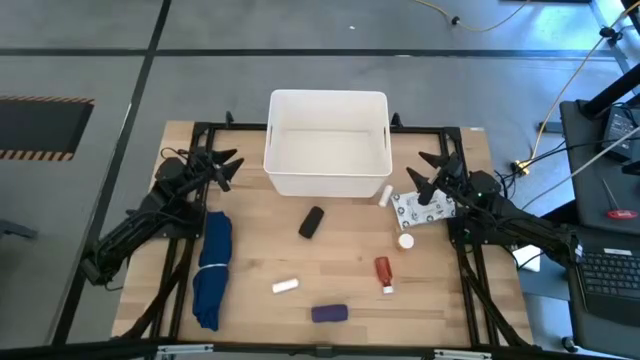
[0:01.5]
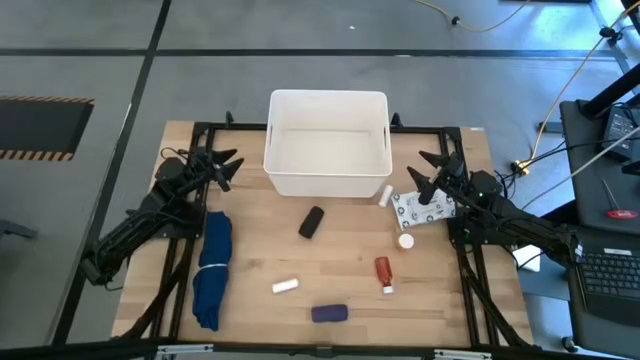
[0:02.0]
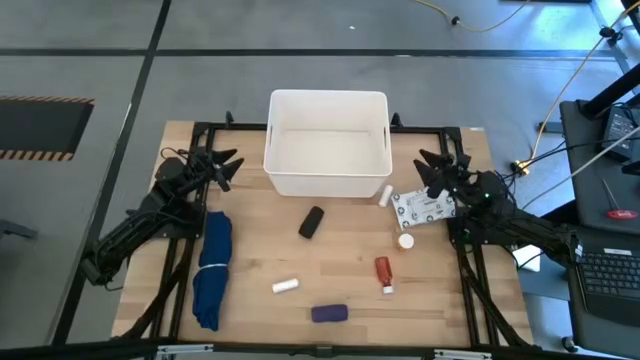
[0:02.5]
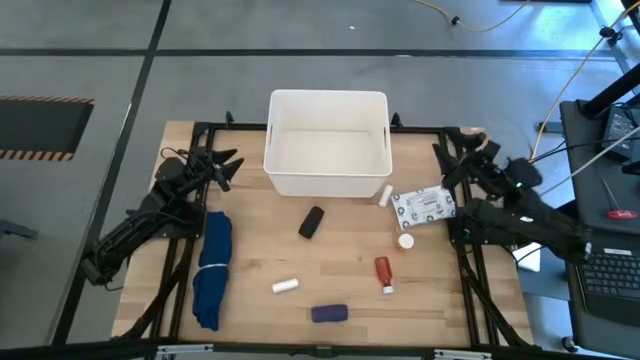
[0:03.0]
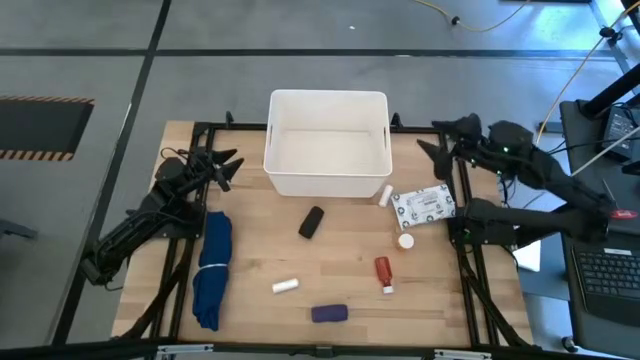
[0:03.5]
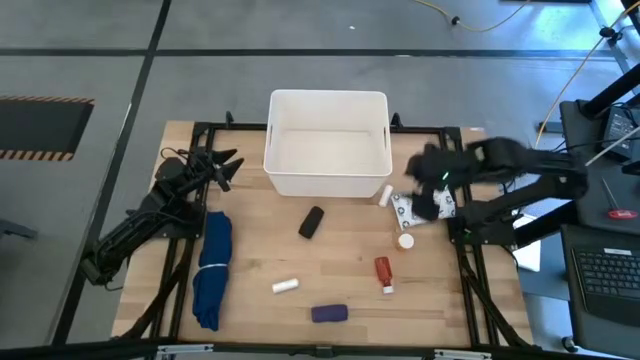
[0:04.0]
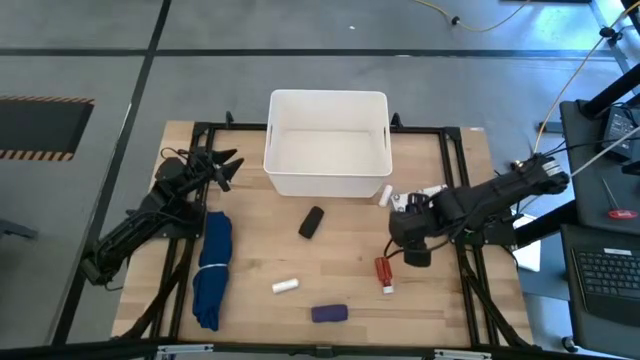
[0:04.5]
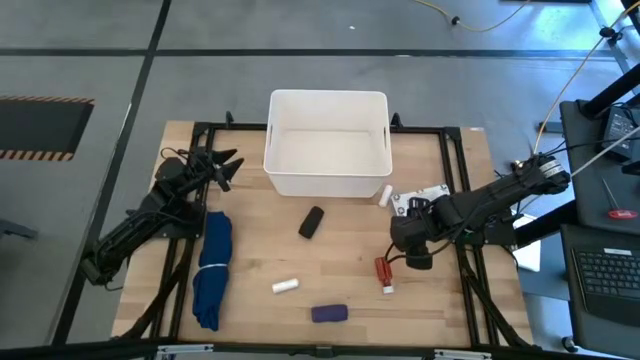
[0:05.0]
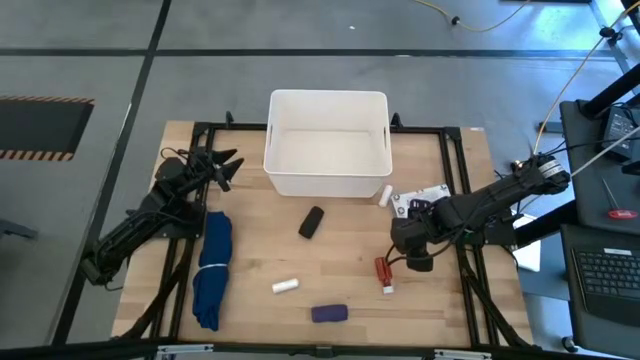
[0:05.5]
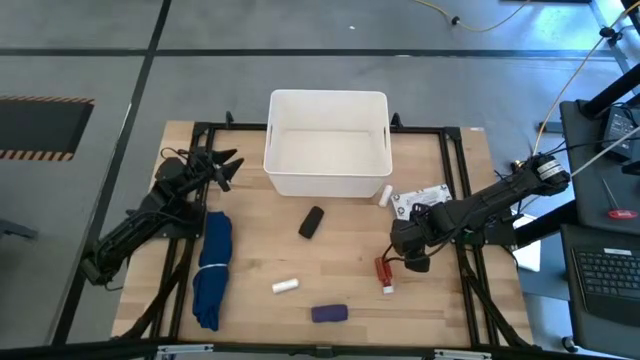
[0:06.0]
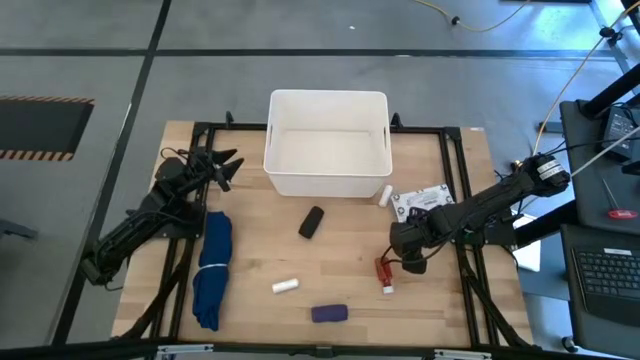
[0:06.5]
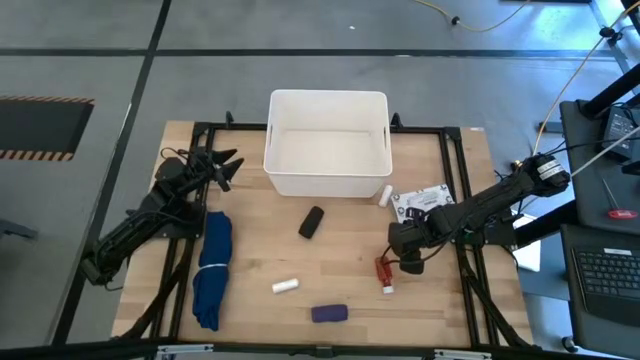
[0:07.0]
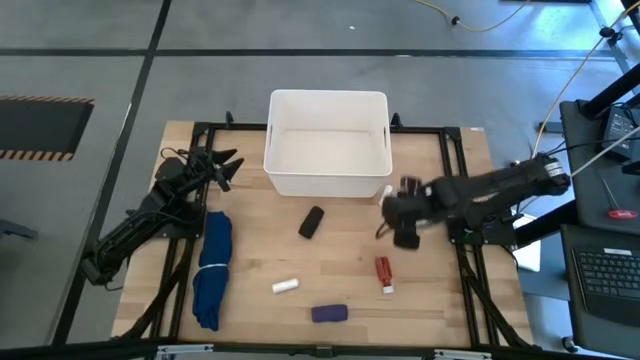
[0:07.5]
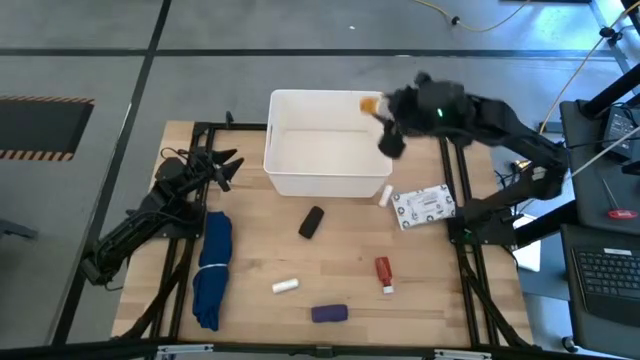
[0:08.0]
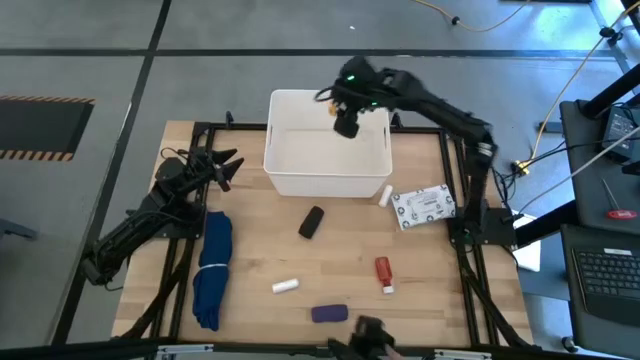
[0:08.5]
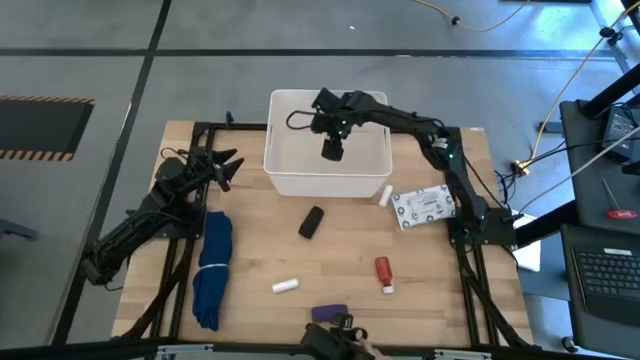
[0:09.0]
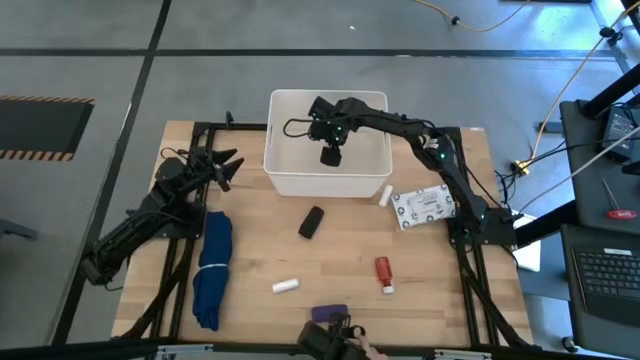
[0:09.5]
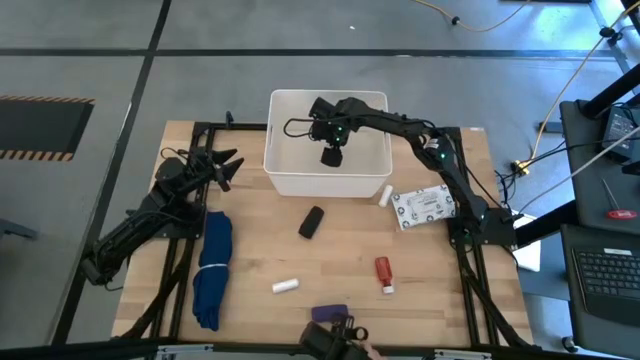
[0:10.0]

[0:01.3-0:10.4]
Task: Pick & place medical supplies in basket/bin
Put the yellow pill bottle into the white bin

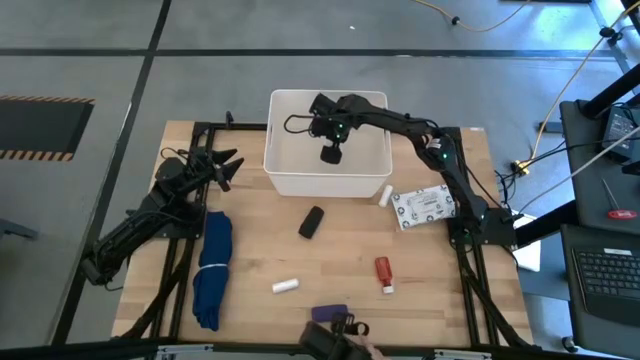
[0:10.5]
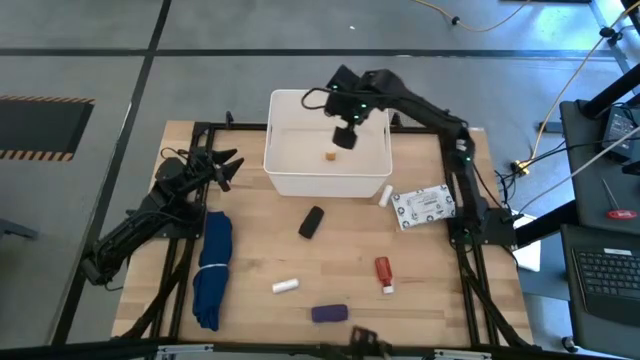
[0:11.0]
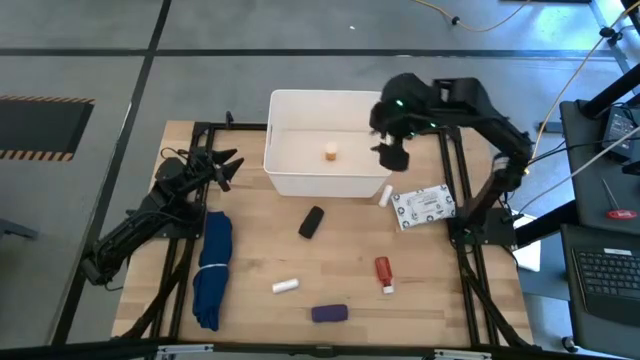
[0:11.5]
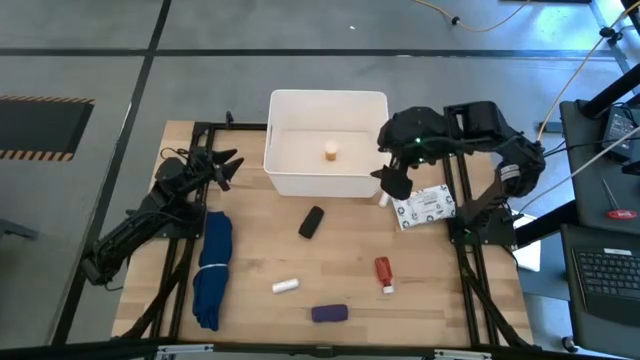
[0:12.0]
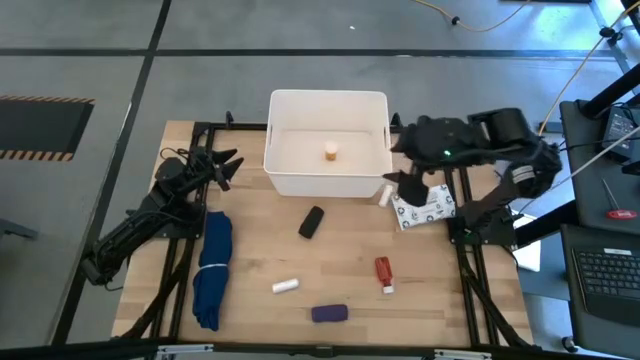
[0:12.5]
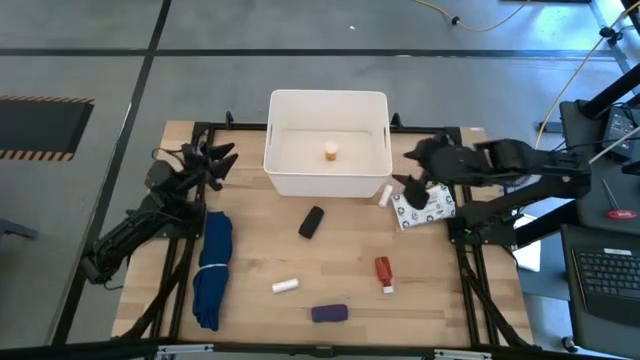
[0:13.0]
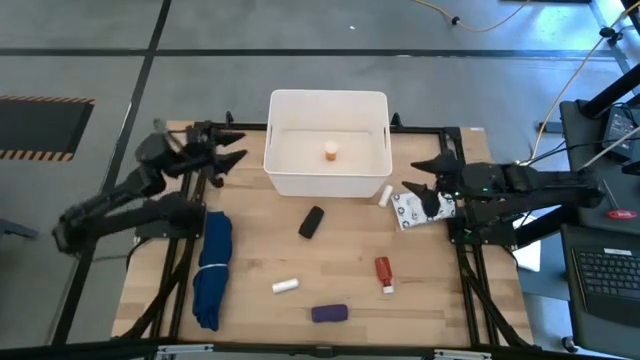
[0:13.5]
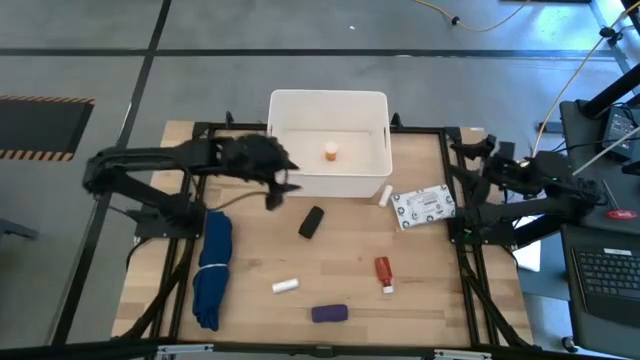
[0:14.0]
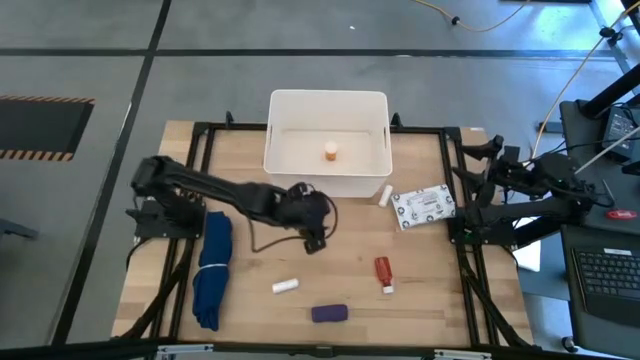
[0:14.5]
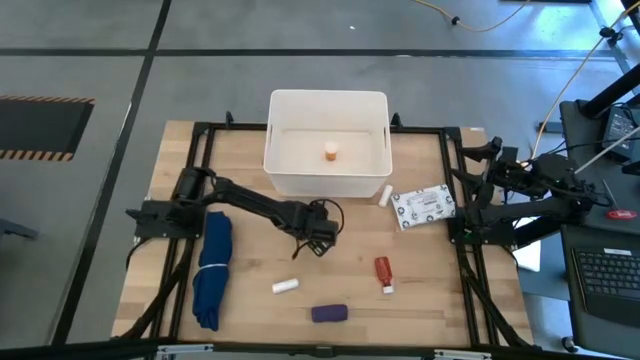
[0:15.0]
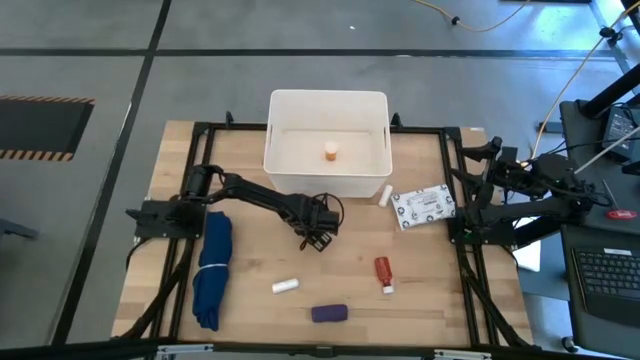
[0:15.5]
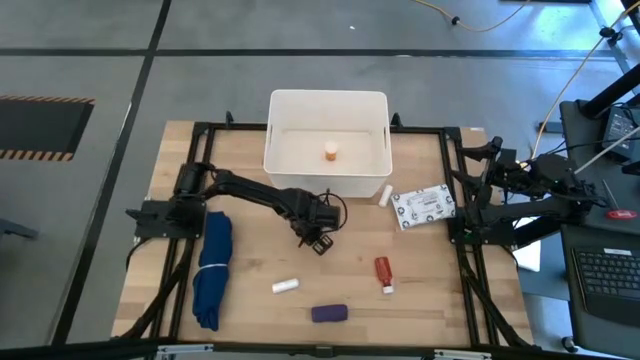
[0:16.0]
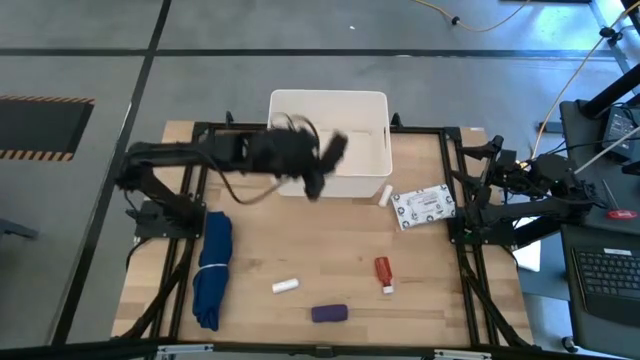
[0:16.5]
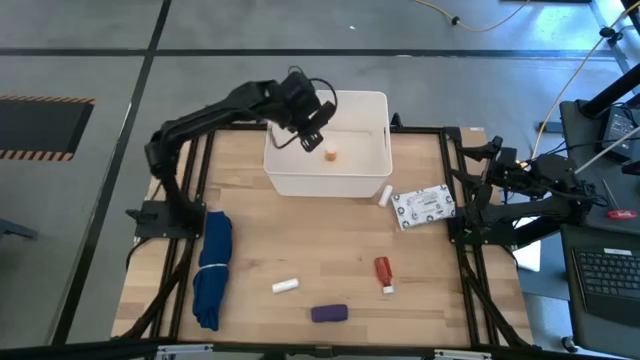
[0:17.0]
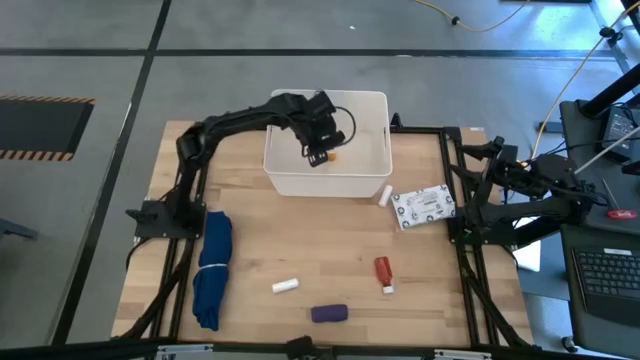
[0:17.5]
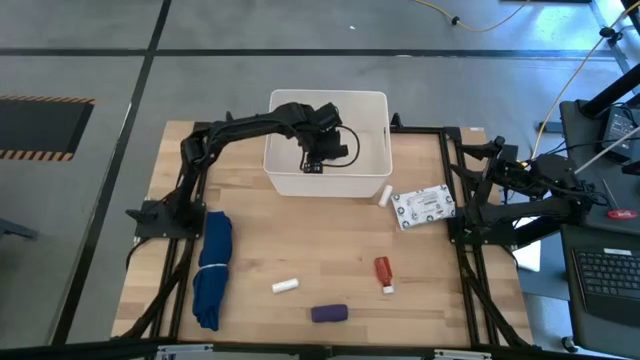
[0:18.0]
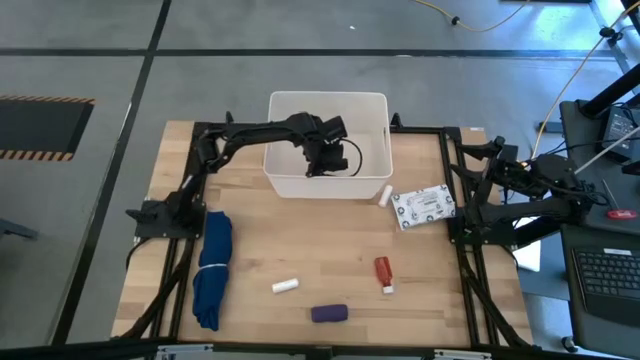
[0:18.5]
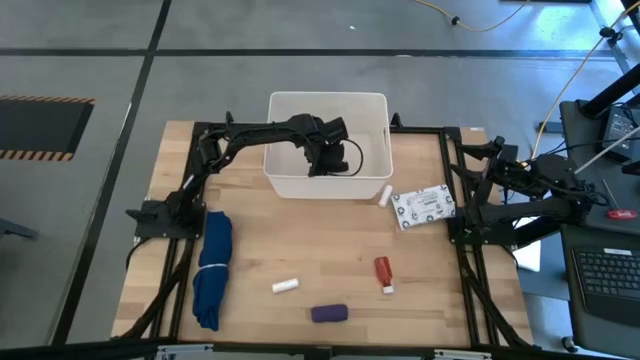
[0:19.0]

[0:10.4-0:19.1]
Put the black bandage into the white bin

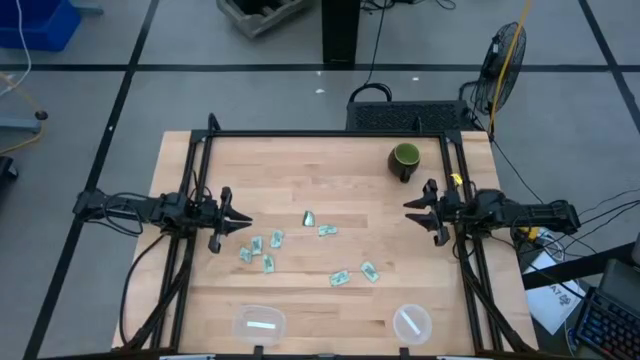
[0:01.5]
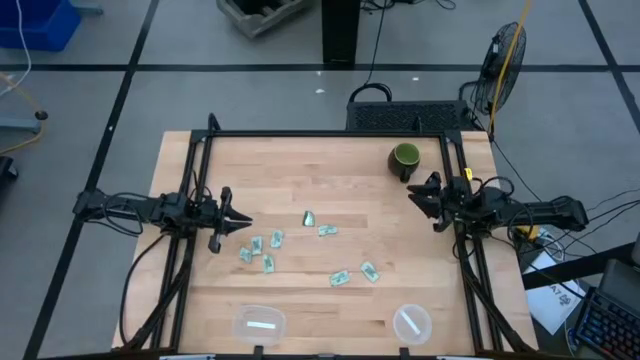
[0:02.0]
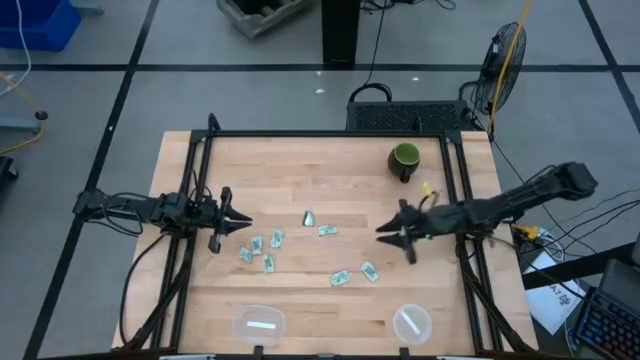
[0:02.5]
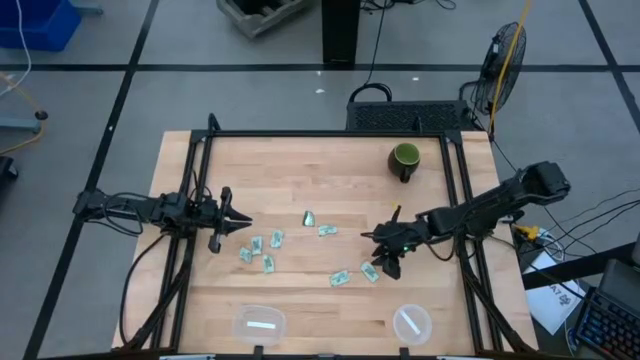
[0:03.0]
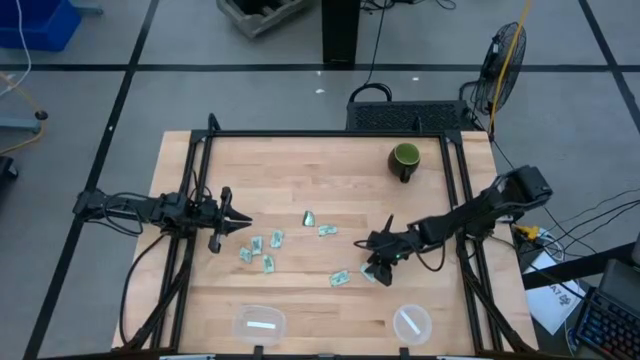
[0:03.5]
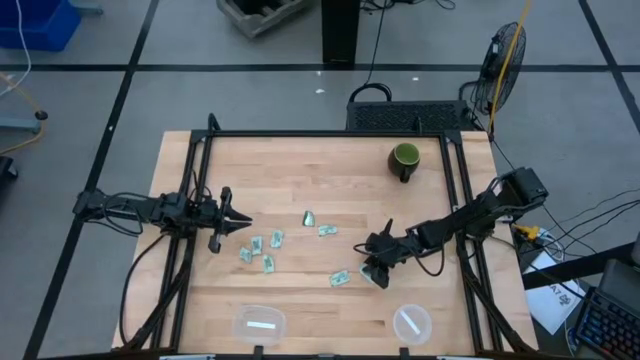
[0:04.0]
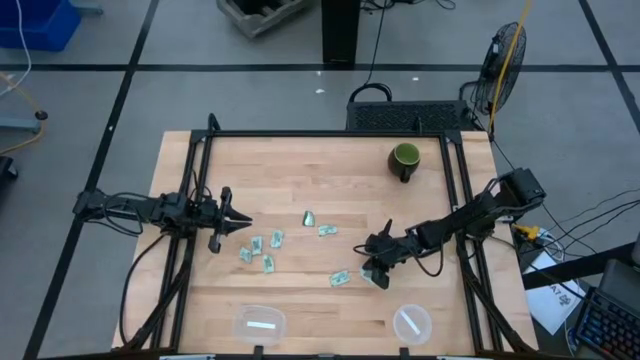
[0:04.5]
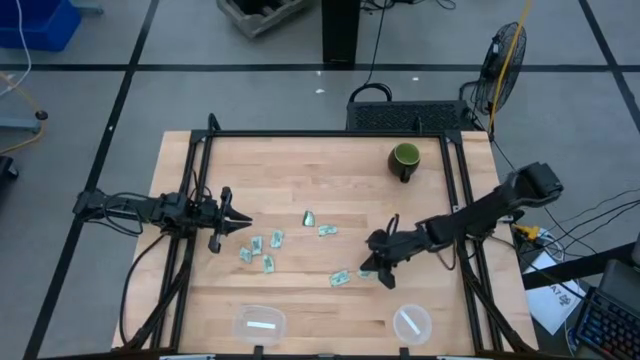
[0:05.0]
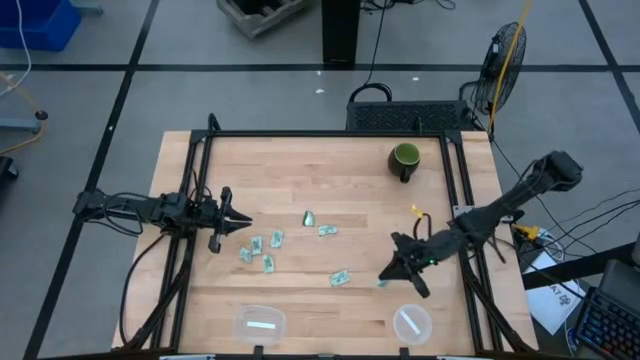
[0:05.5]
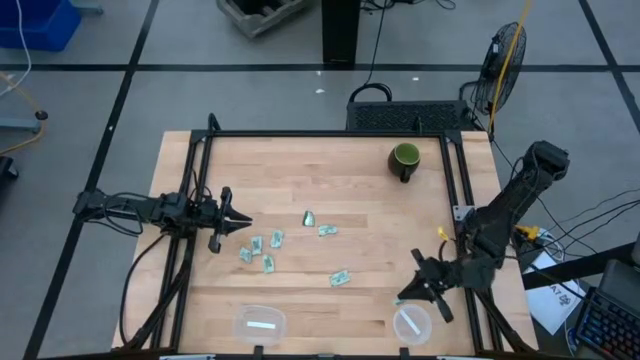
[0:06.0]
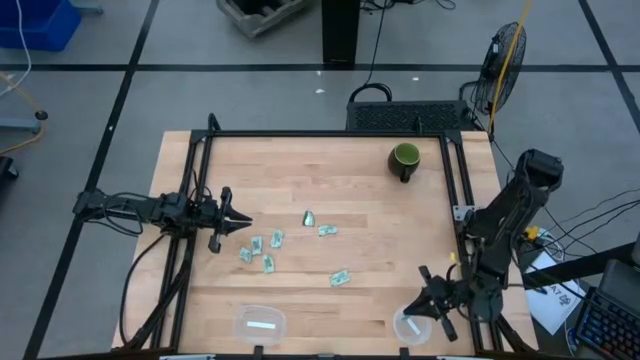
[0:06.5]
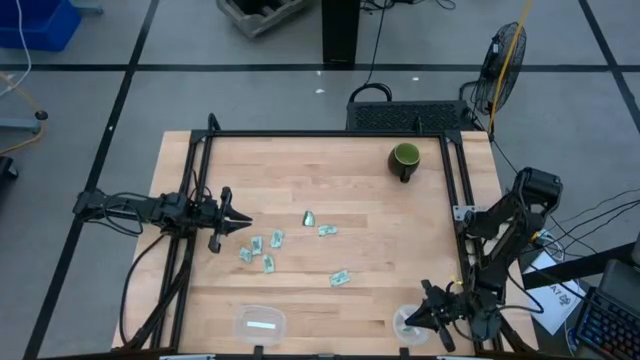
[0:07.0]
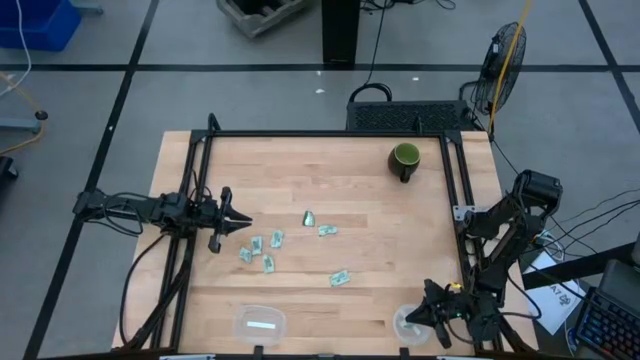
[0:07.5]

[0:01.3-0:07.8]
Task: Pick and place Stevia / Truvia into bins
Put the stevia packet into the right transparent container
